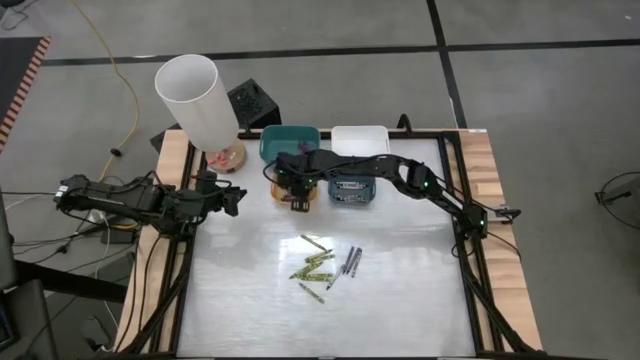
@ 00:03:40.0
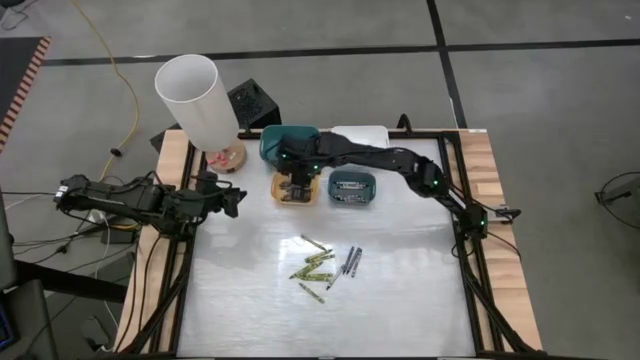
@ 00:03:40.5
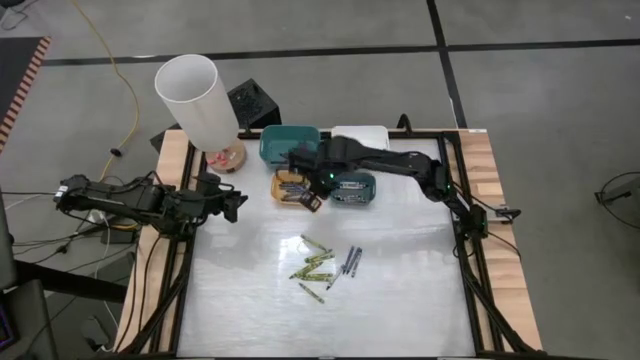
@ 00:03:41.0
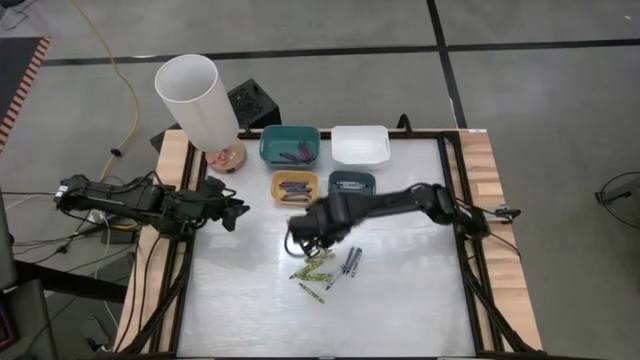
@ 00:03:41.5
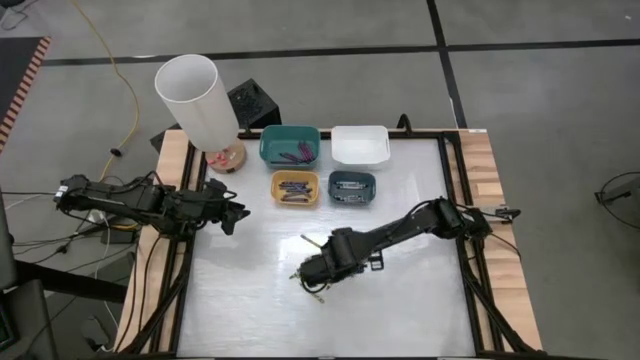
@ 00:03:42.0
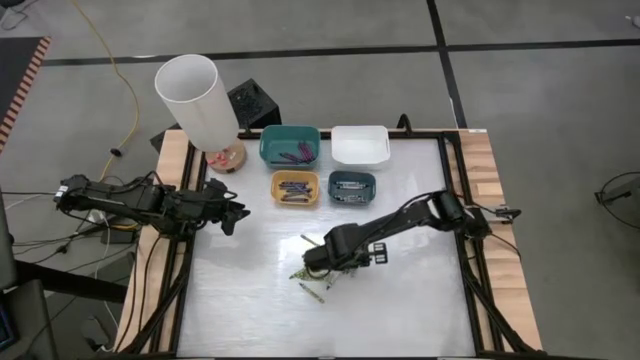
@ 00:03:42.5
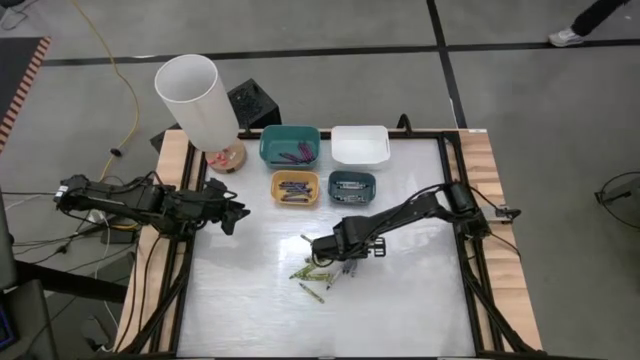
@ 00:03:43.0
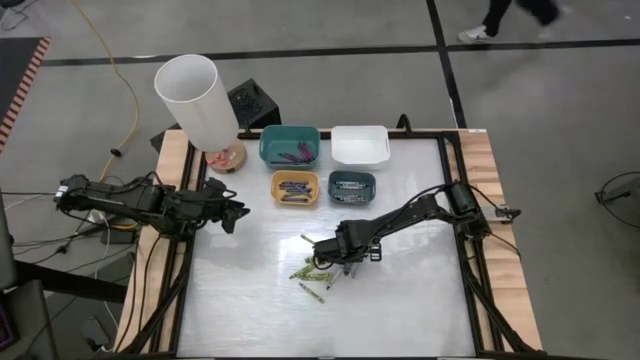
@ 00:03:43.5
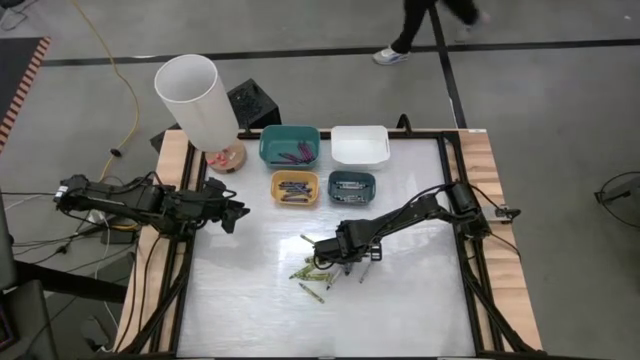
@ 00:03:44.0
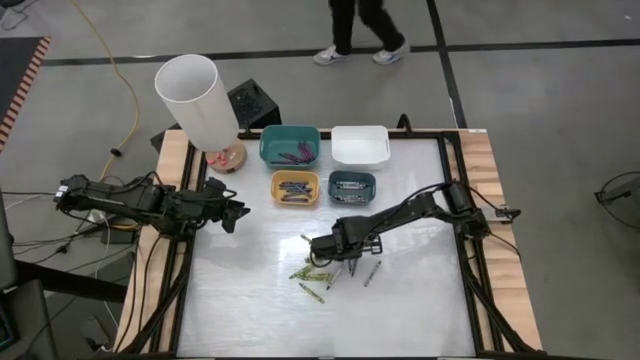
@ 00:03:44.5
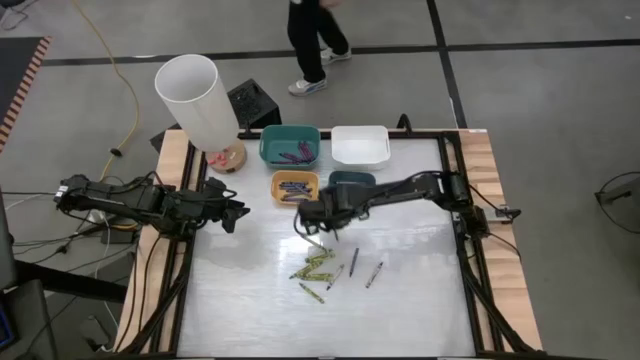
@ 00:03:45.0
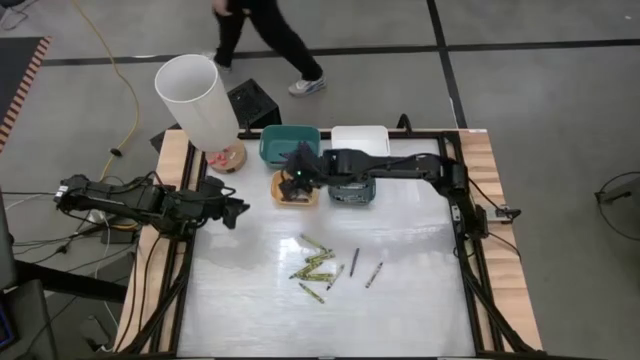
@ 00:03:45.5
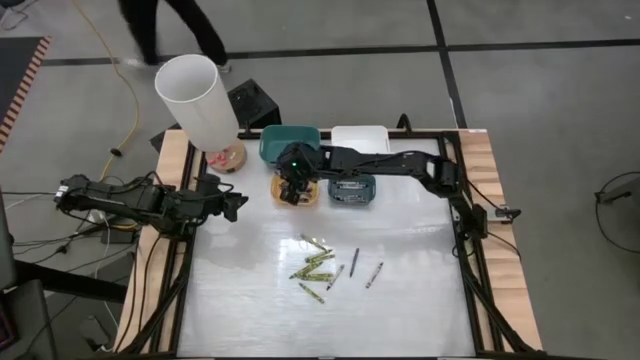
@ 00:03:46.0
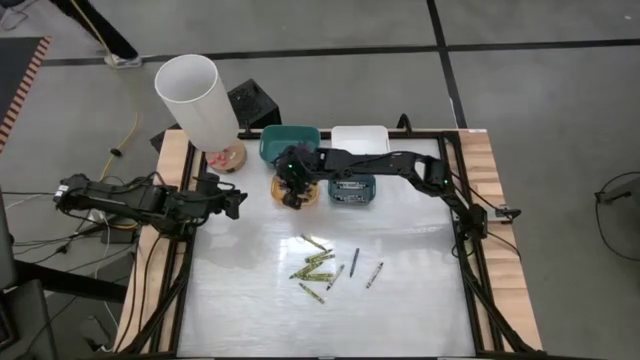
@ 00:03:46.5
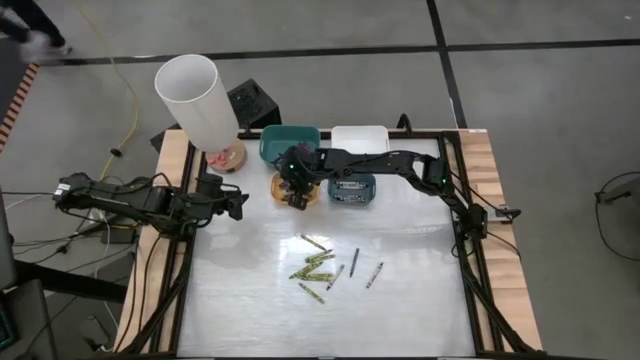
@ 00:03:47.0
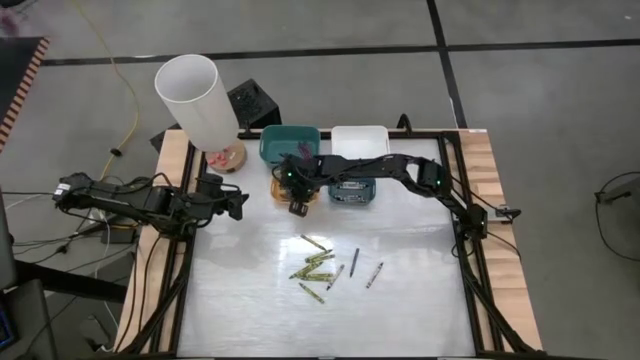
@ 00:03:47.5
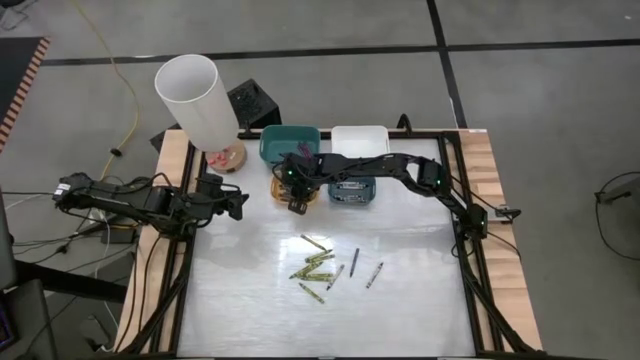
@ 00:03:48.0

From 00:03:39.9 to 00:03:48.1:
Task: Sort crayons
Put the blue crayon into the yellow bin

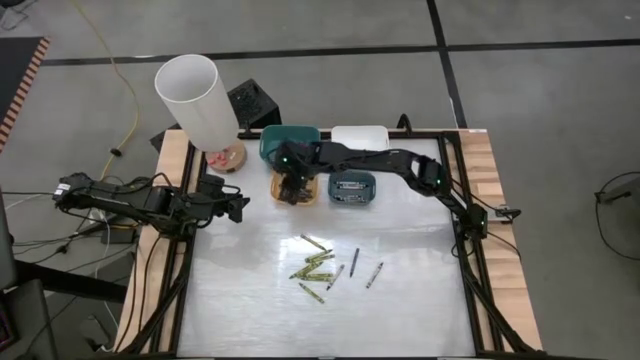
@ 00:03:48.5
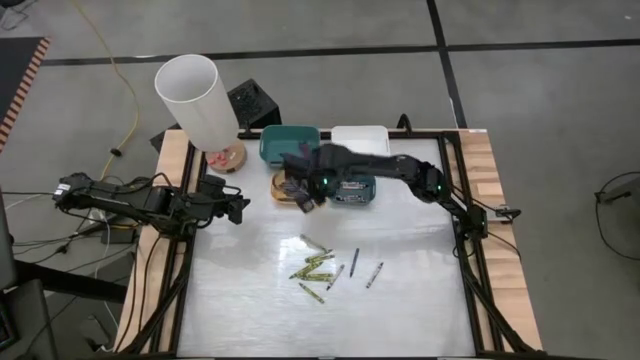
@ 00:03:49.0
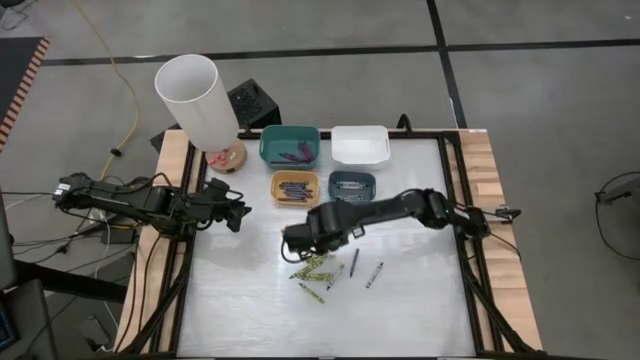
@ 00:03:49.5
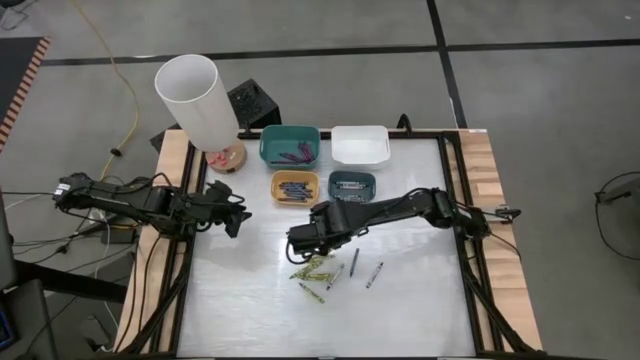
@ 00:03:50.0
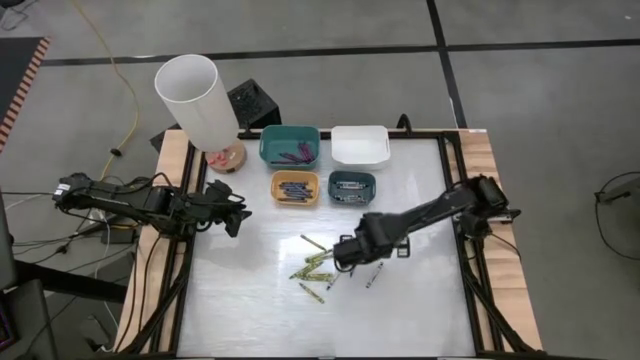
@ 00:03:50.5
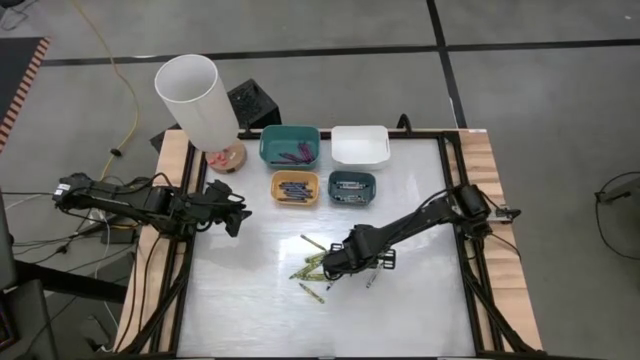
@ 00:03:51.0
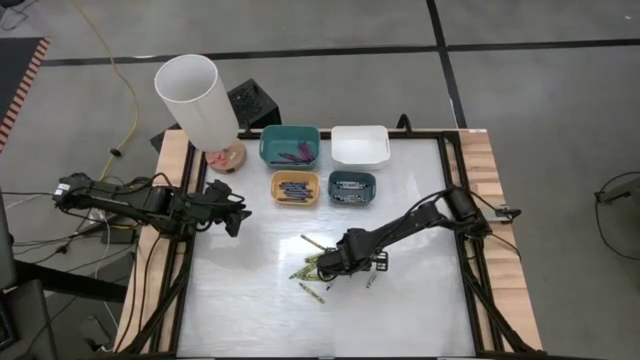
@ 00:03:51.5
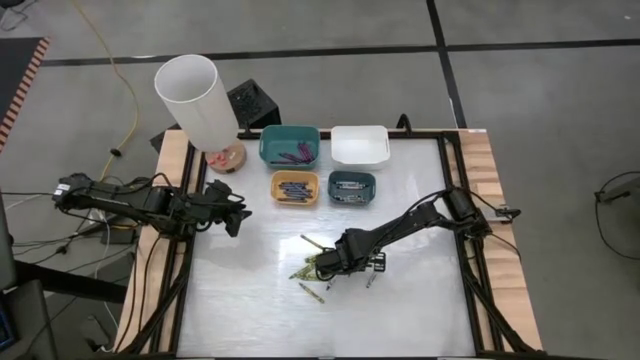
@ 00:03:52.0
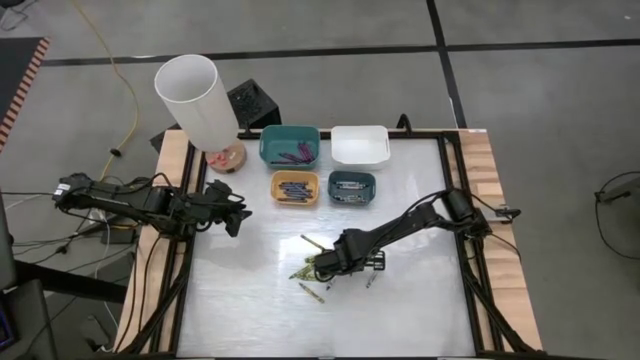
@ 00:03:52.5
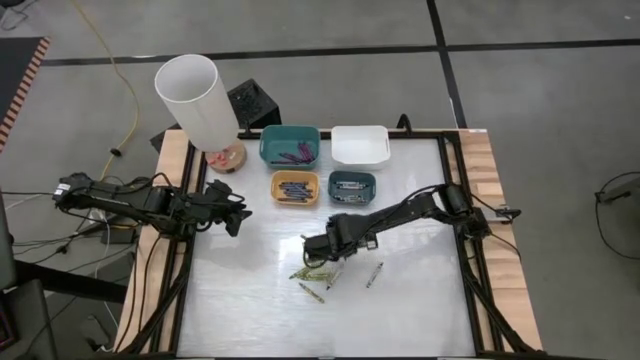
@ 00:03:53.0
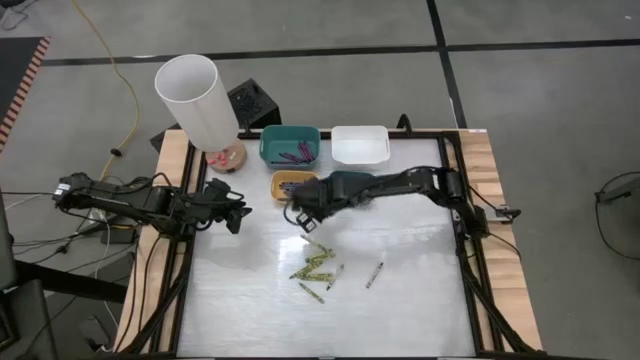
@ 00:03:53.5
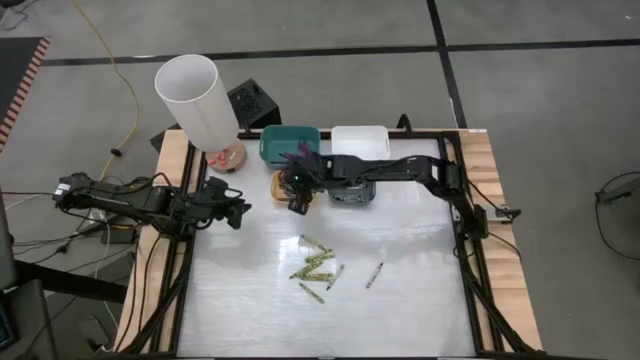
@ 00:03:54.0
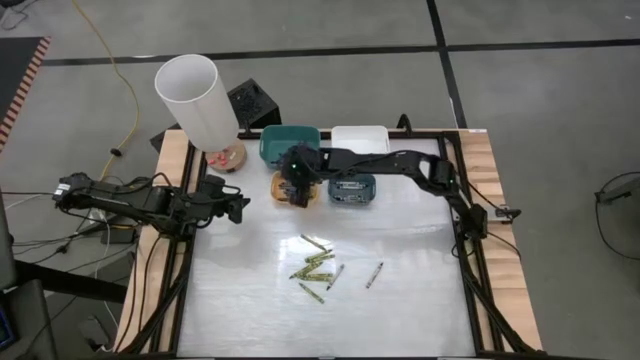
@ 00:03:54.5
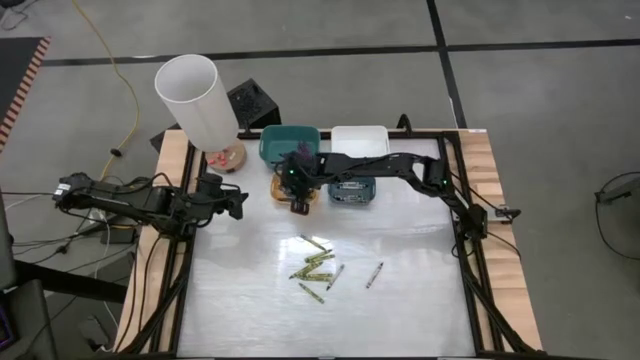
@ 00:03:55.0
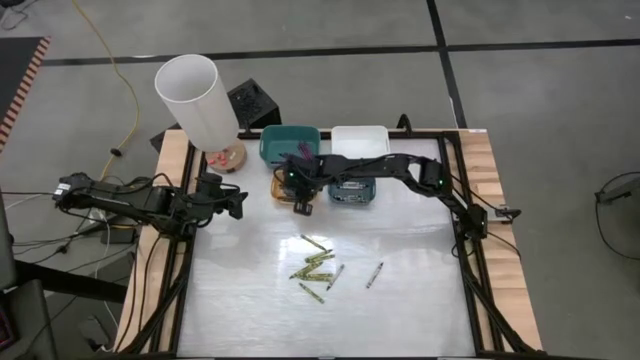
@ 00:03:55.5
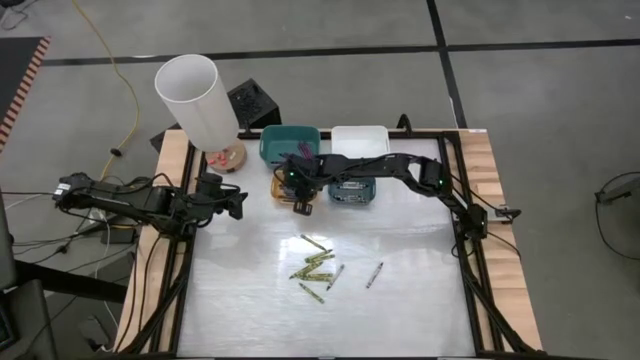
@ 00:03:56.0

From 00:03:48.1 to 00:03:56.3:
Put the blue crayon into the yellow bin

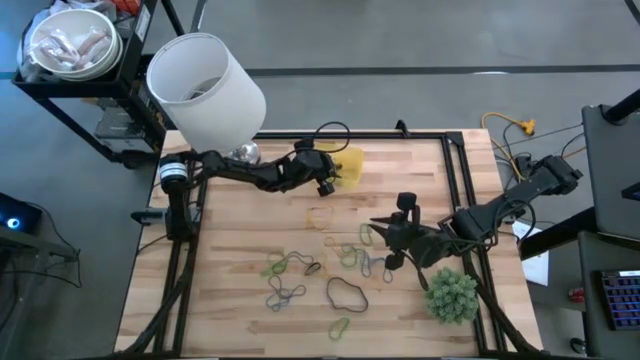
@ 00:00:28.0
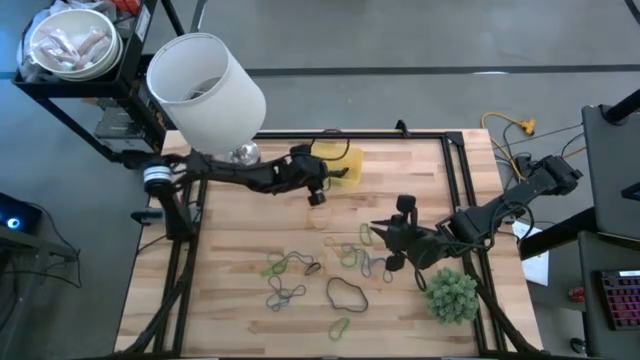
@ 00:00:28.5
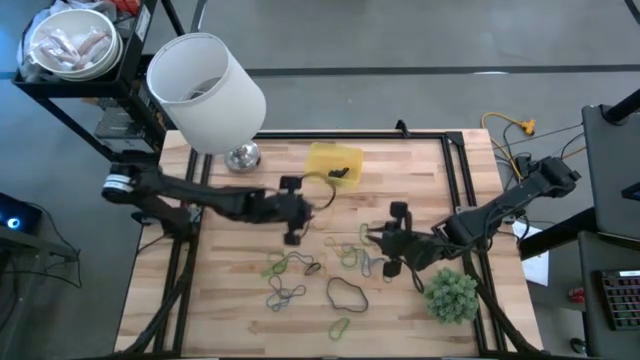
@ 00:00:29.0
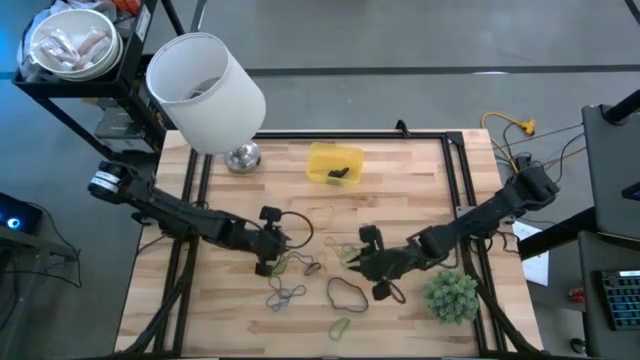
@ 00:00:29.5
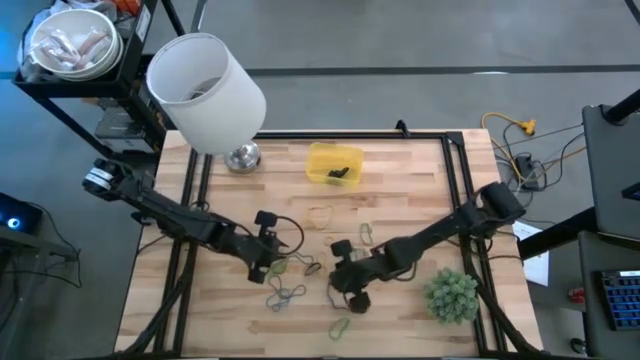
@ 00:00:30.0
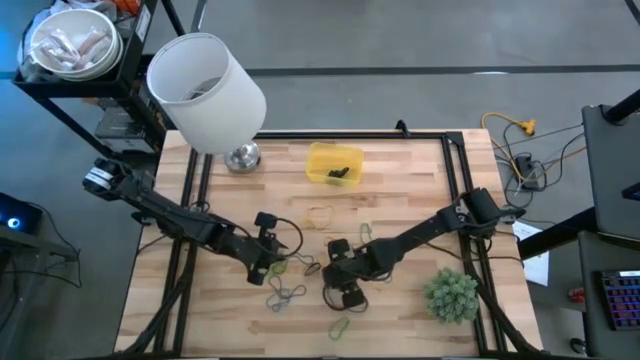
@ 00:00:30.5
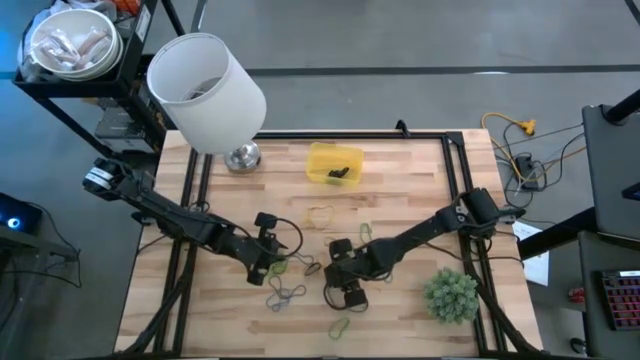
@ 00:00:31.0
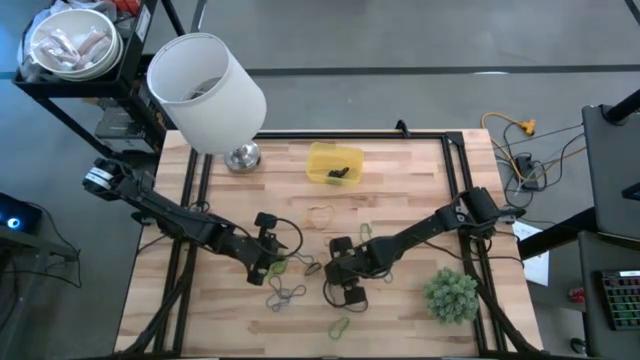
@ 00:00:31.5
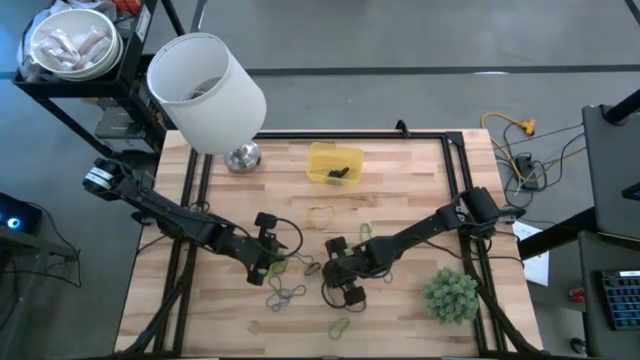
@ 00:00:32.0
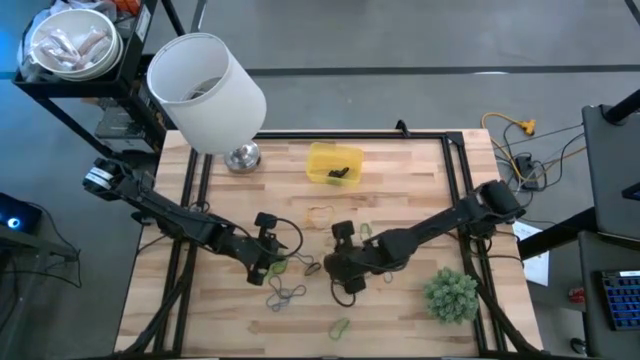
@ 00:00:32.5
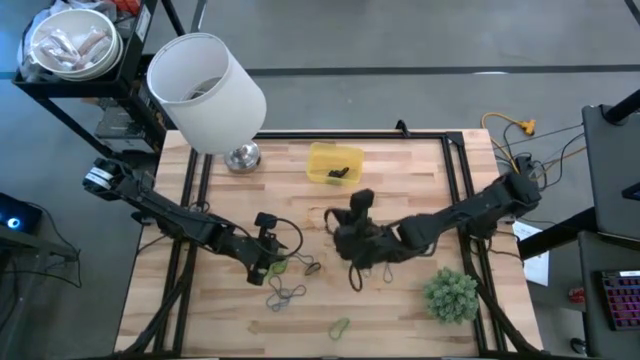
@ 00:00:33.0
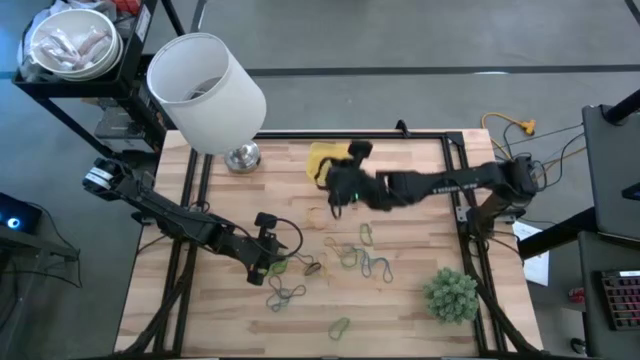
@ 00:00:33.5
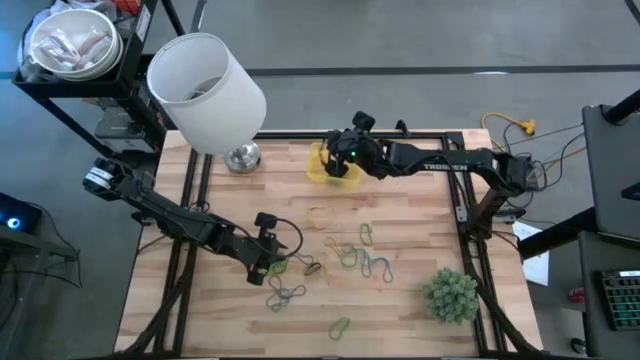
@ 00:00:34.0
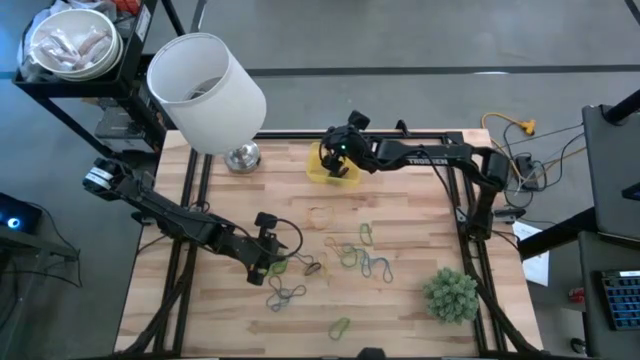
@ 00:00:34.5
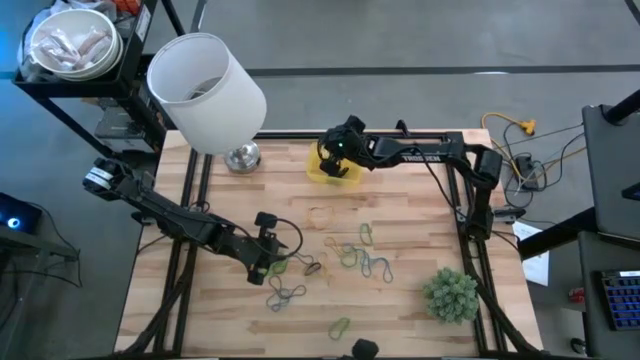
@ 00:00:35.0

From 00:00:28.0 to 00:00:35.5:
Task: Pick and place rubber bands into bin
Put the black rubber band into the yellow bin
